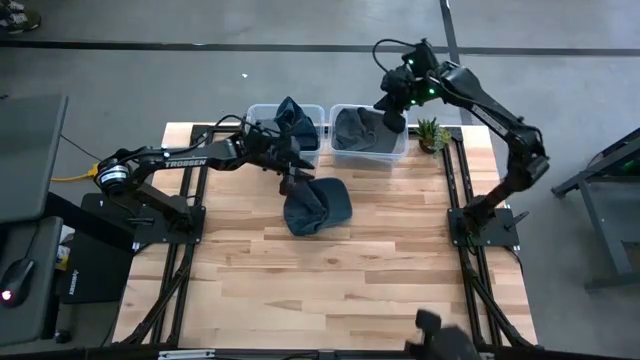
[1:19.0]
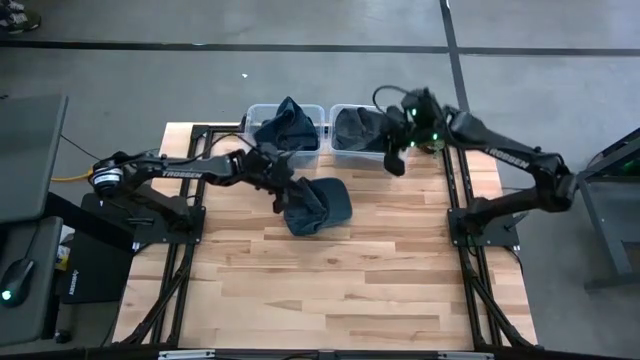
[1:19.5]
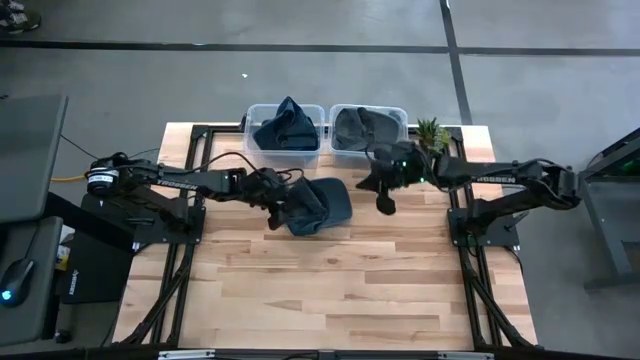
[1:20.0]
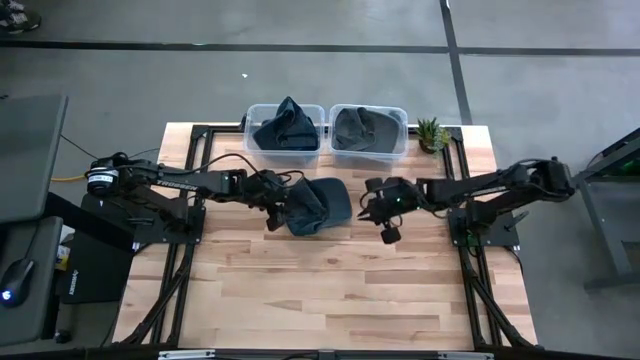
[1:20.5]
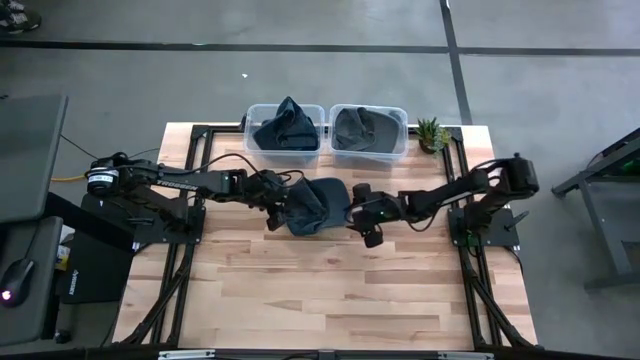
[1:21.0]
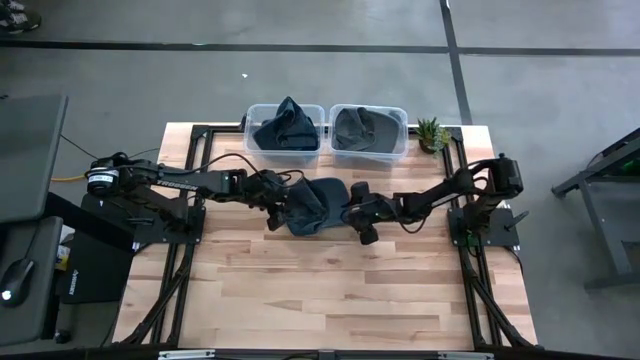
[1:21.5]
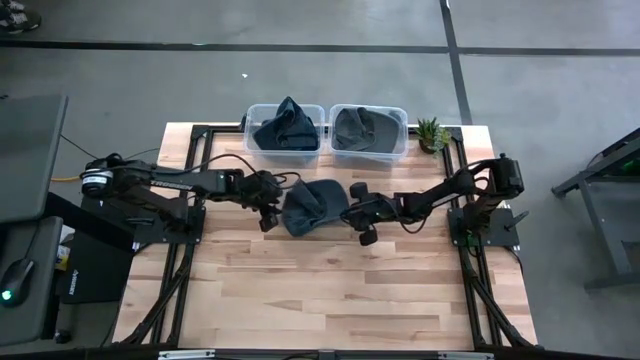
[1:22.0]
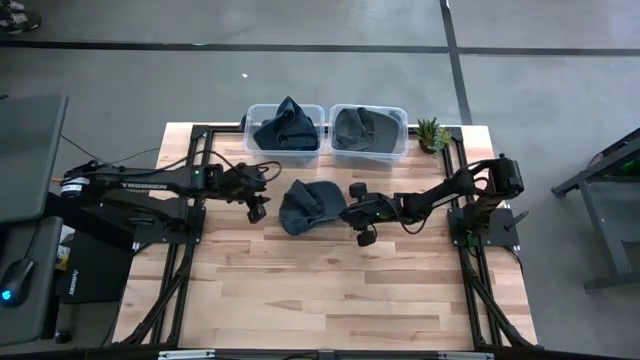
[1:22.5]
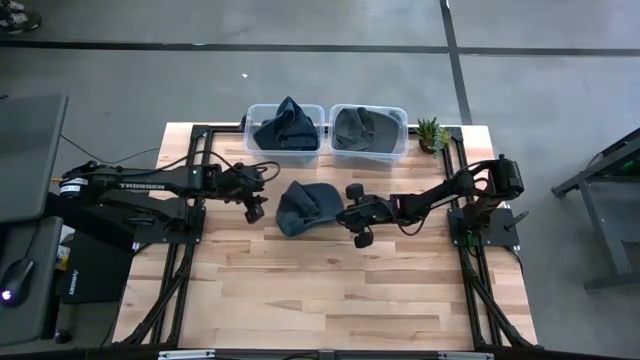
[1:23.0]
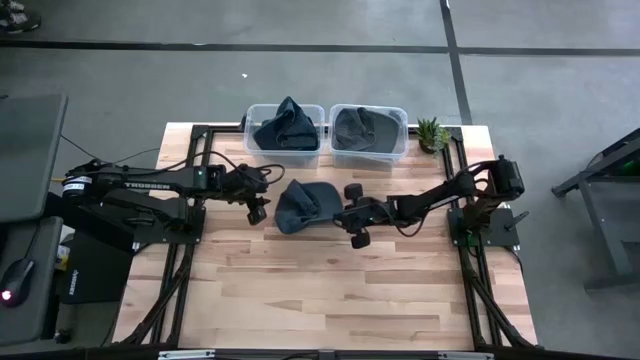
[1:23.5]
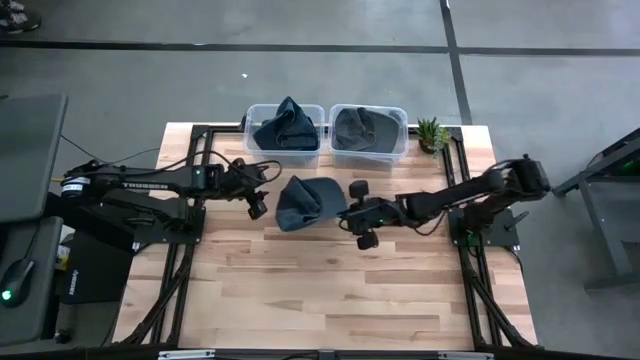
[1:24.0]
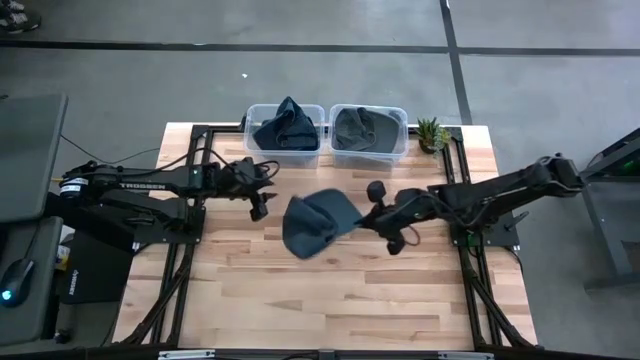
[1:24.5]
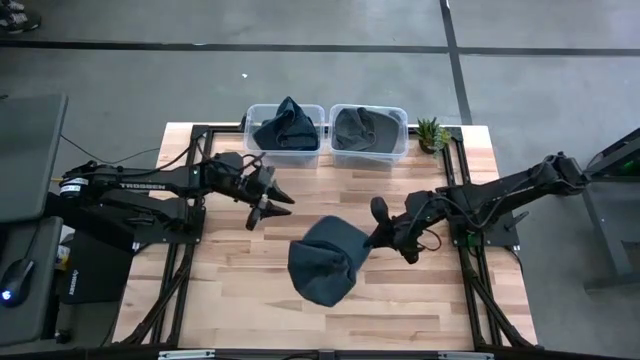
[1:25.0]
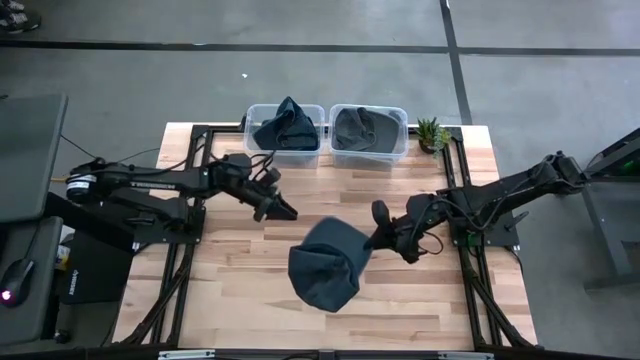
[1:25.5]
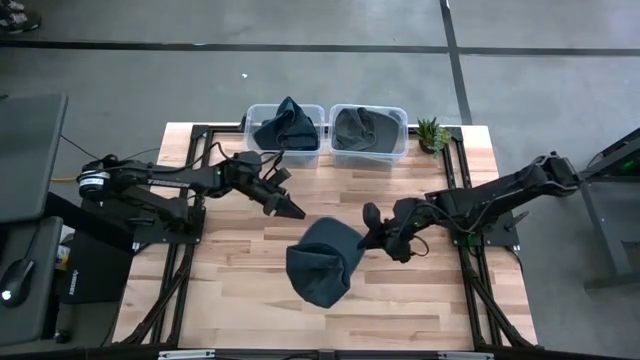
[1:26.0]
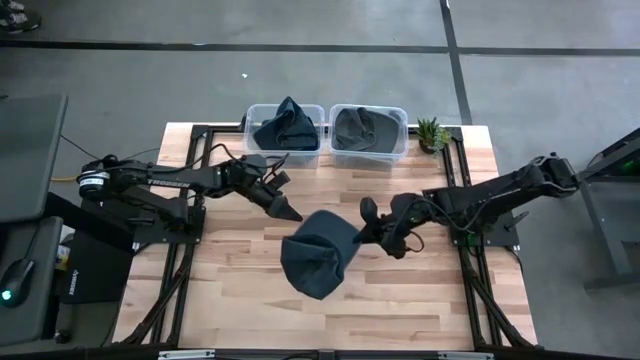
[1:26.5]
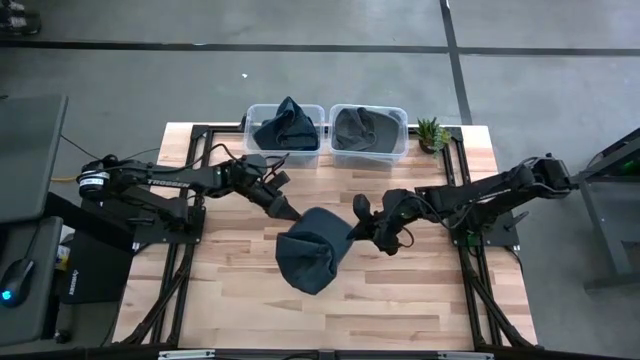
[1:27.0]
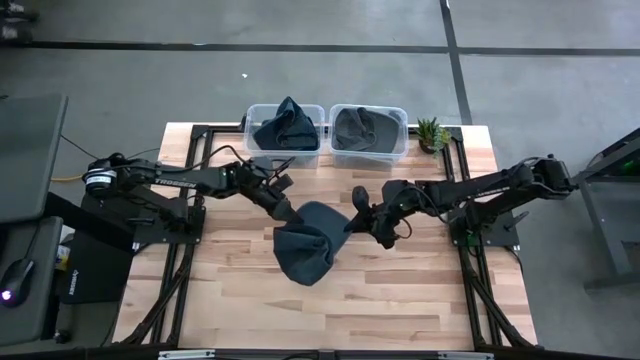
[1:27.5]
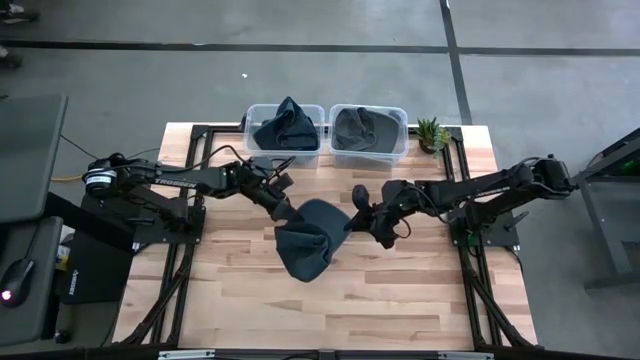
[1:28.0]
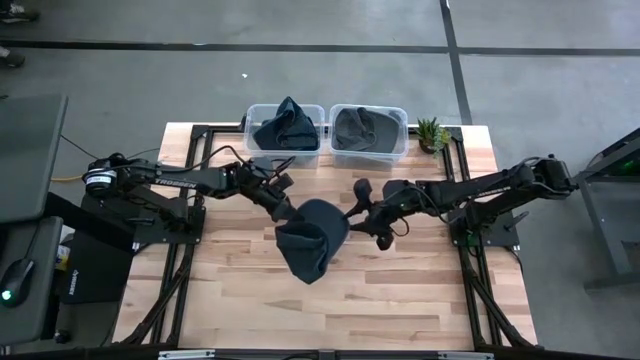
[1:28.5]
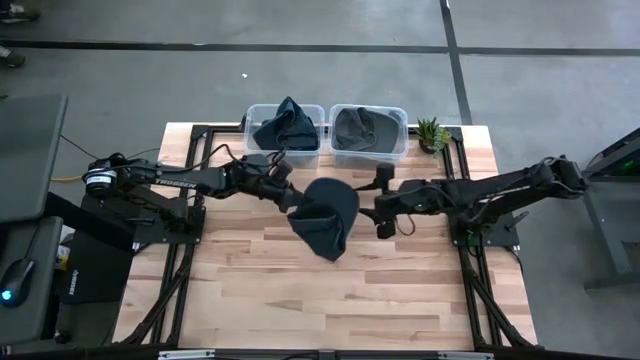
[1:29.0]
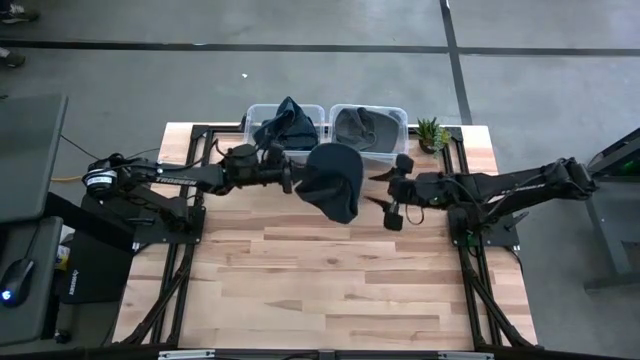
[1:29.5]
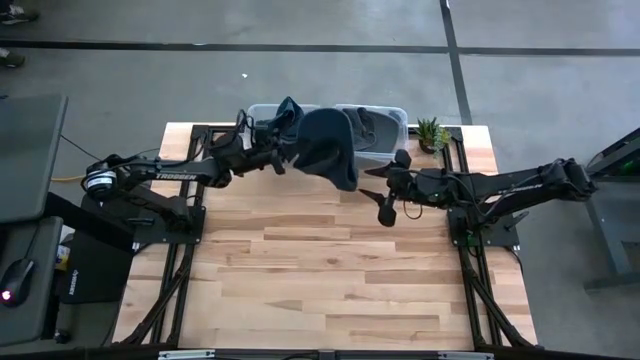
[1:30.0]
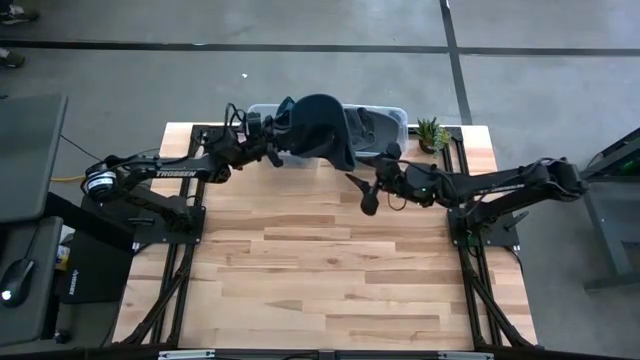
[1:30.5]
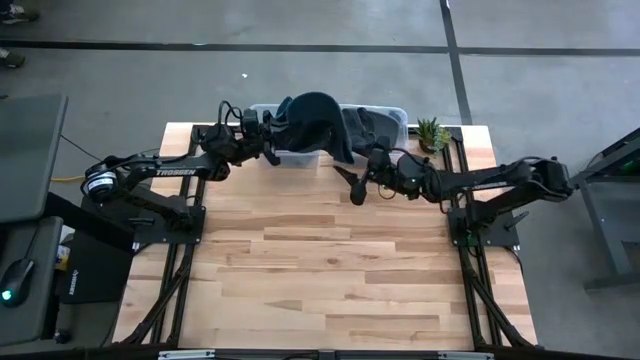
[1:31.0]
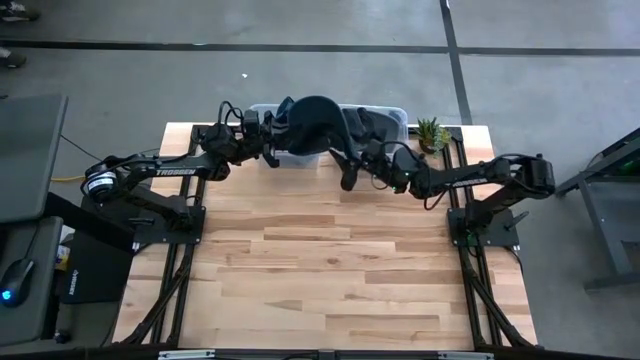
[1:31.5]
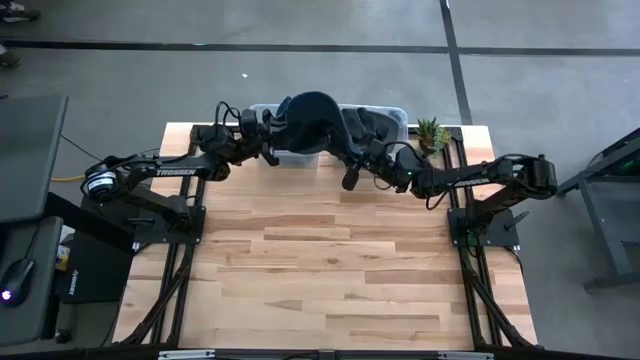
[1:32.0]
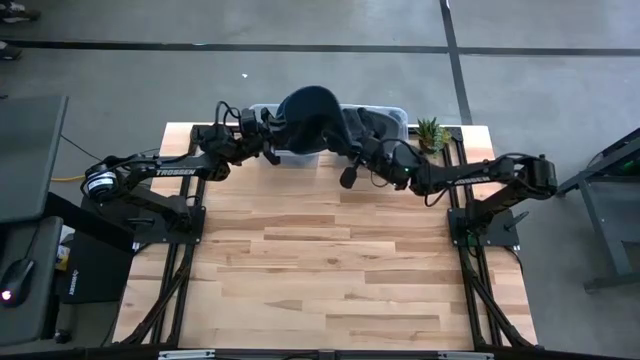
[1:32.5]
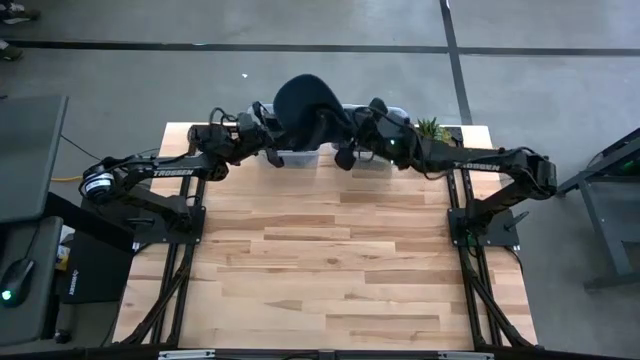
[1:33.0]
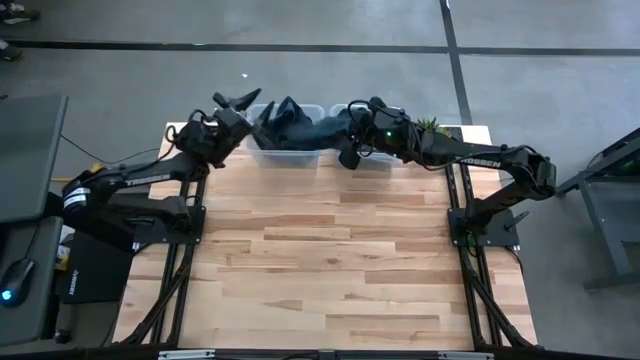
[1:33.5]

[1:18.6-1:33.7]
Task: Pick and place caps into container
Put the dark blue cap into the left transparent container

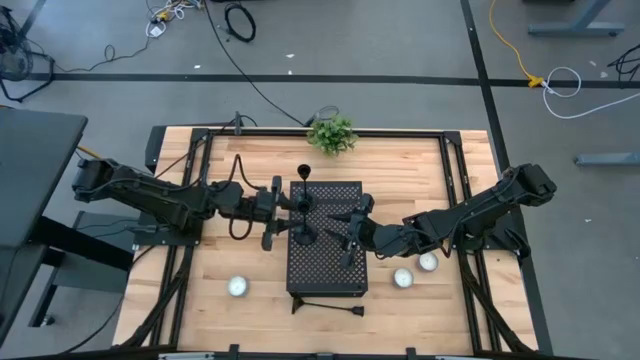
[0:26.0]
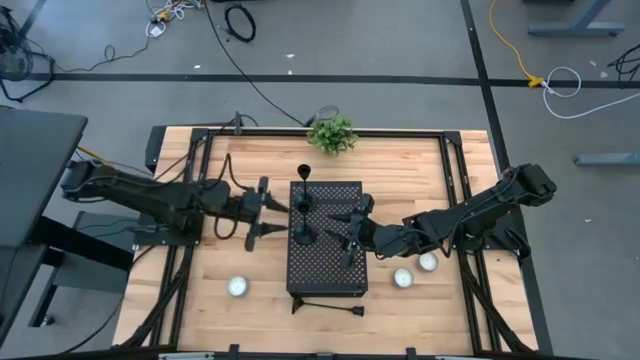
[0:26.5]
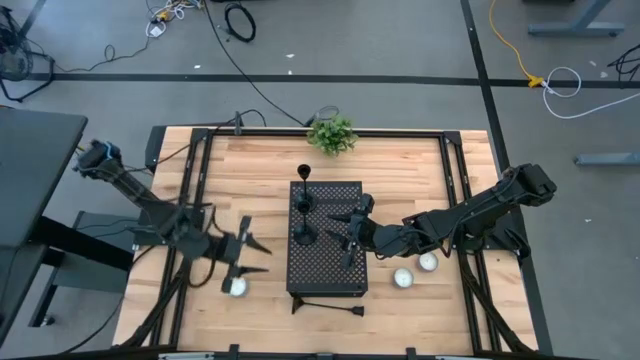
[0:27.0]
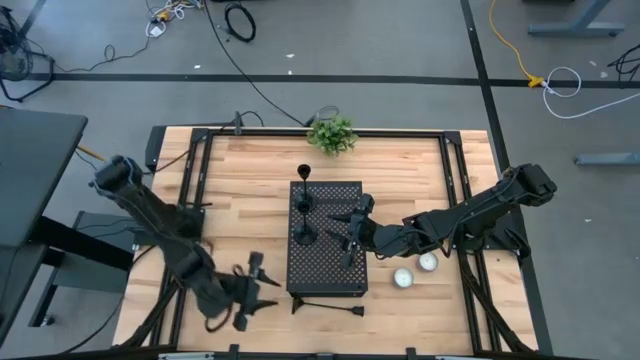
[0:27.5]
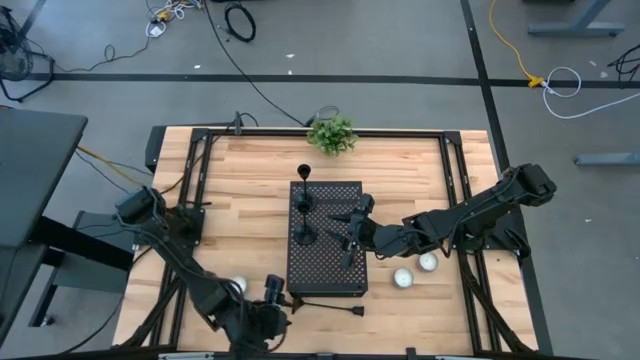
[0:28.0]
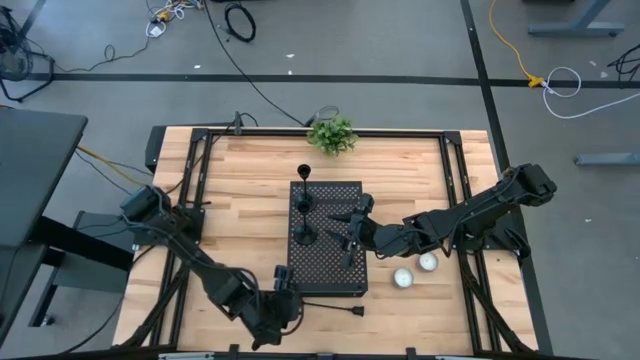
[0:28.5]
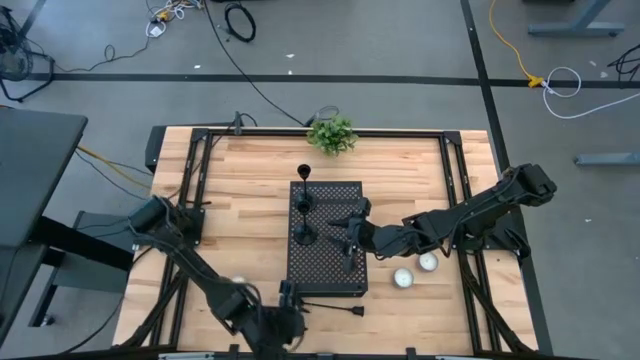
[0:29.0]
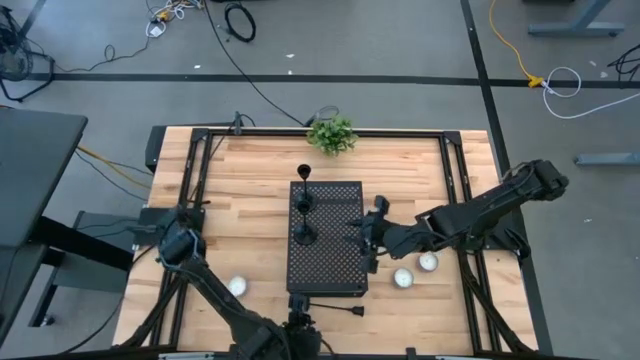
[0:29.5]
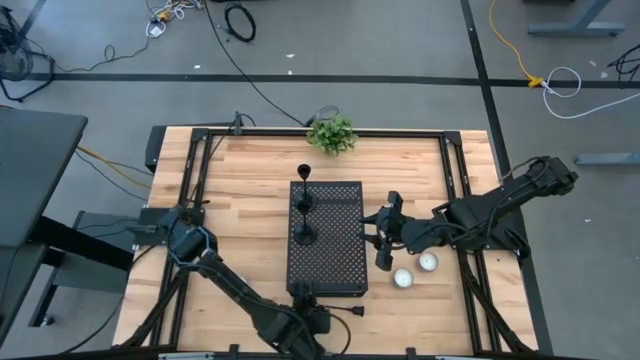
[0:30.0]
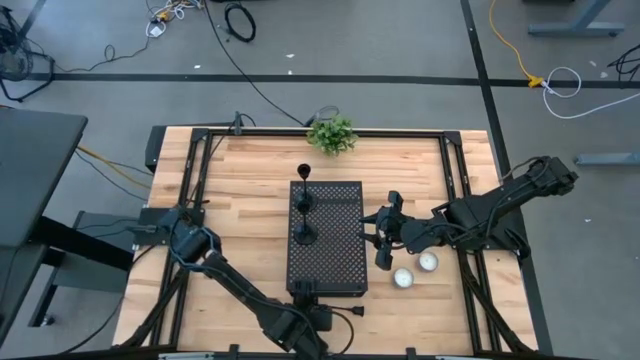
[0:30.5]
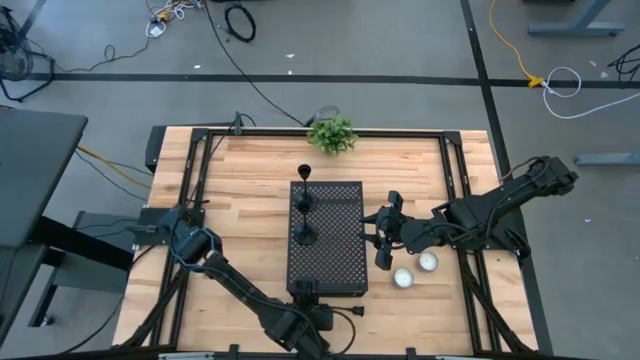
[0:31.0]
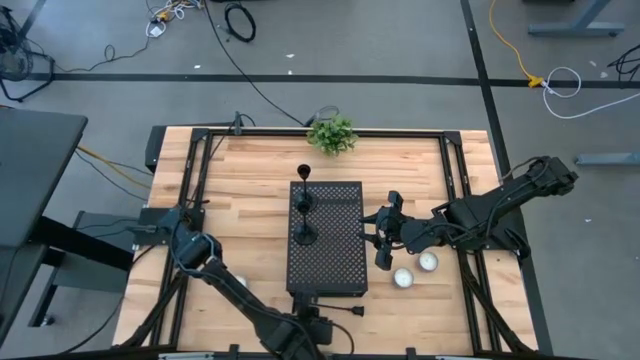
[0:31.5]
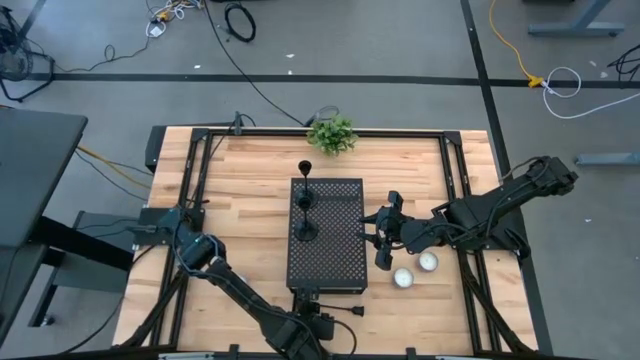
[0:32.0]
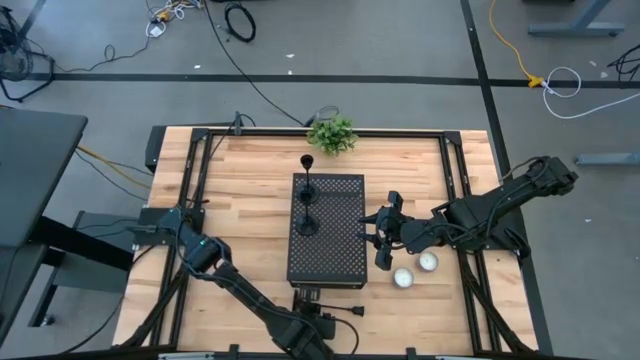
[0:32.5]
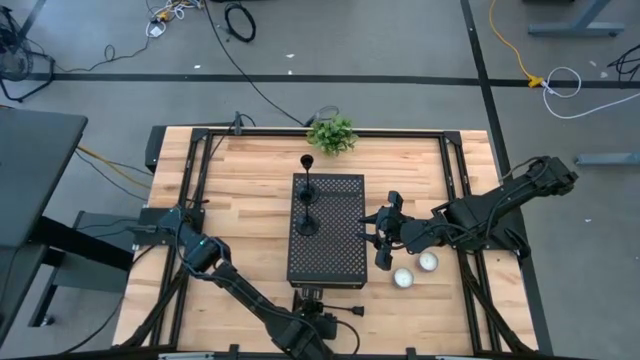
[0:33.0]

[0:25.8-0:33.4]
Task: Pick & Place candle stick holders
Put the black candle holder on the shelf aligned with the other black candle holders
